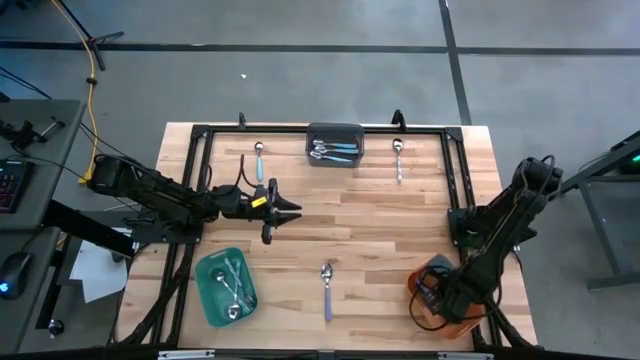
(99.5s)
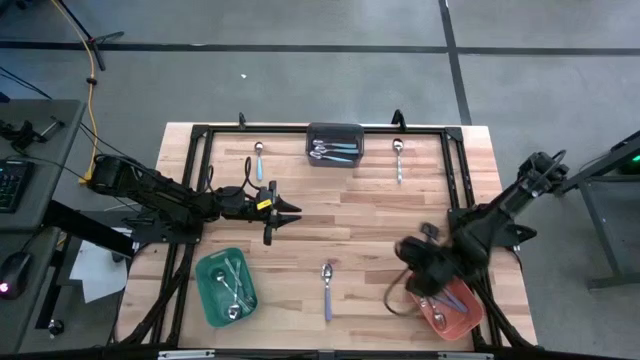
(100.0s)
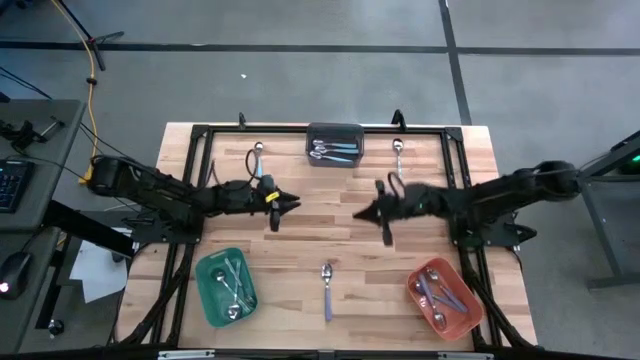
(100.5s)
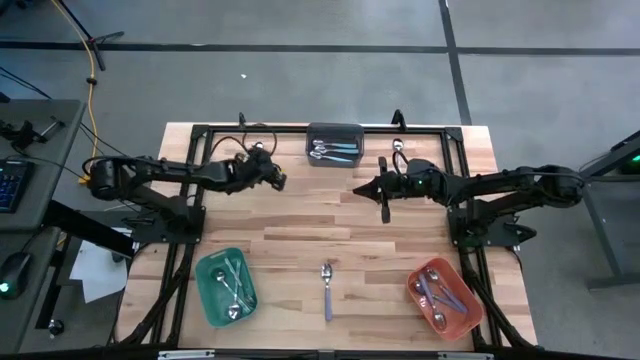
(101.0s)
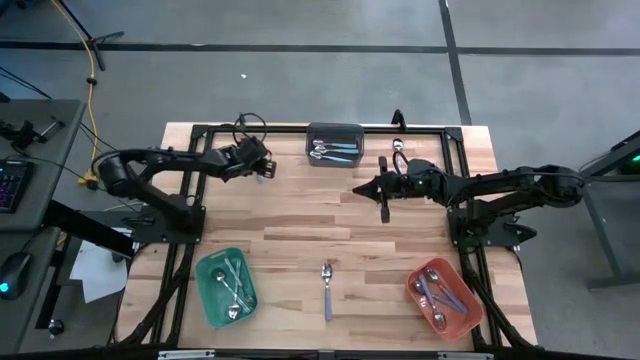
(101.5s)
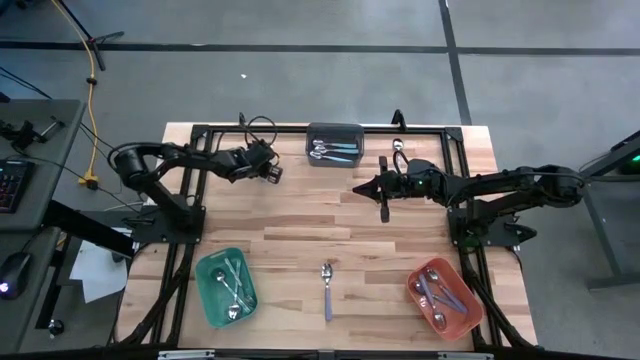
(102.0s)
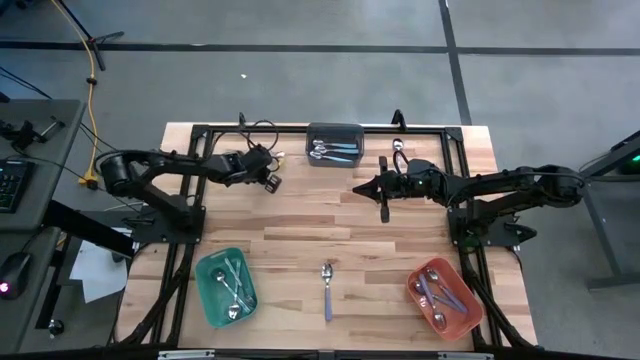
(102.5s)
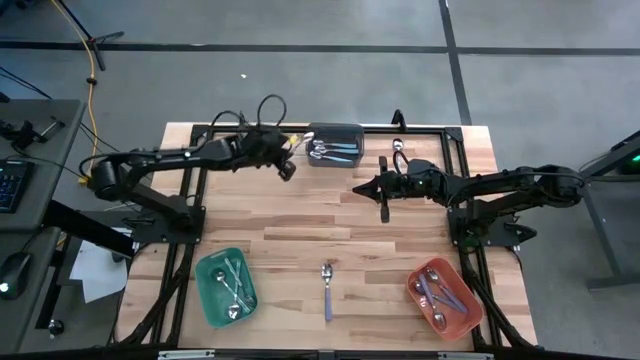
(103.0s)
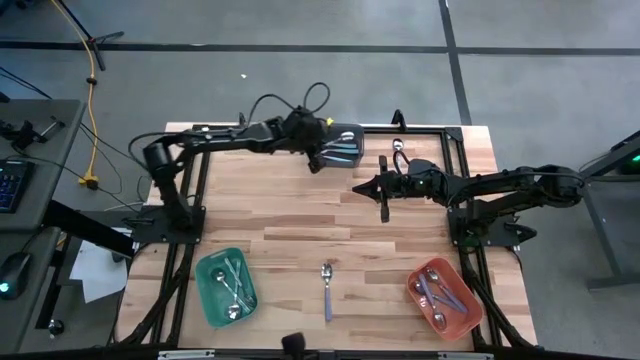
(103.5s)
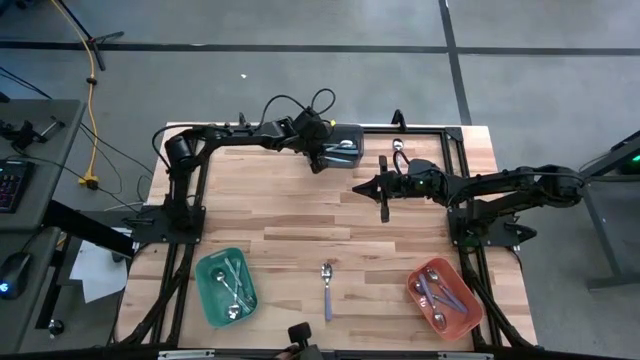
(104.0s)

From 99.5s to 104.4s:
Task: Sort silverware by color (type)
Put the blue spoon into the black bin

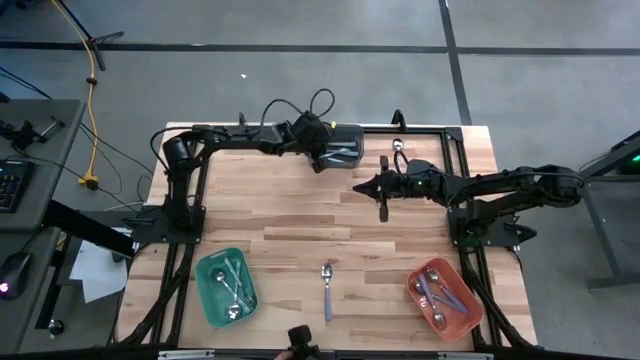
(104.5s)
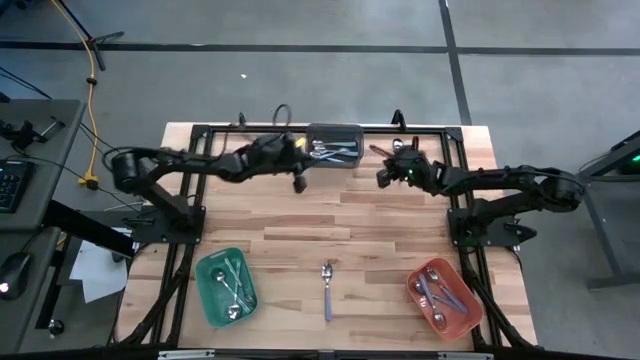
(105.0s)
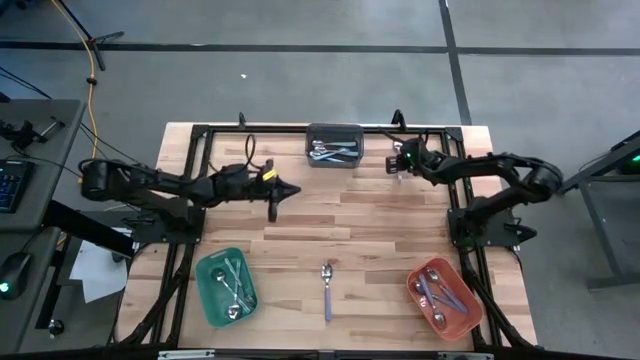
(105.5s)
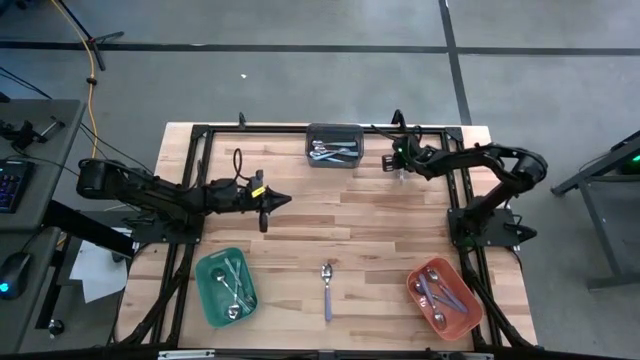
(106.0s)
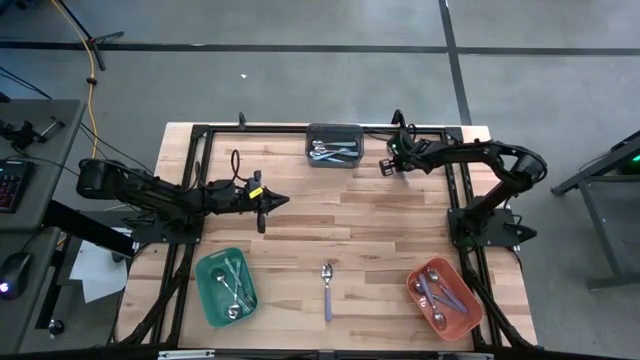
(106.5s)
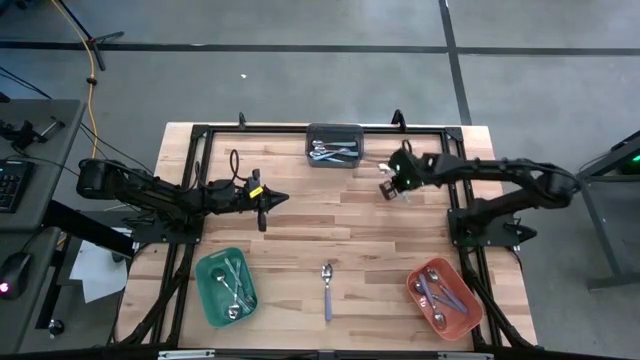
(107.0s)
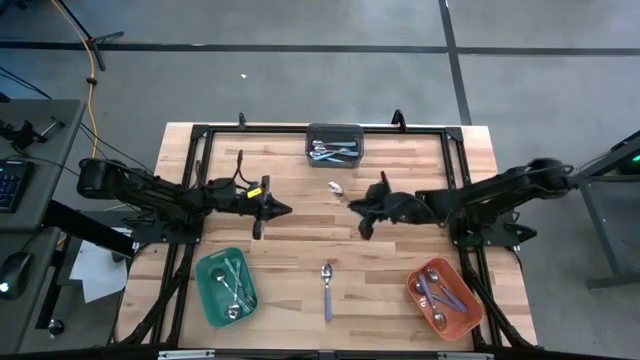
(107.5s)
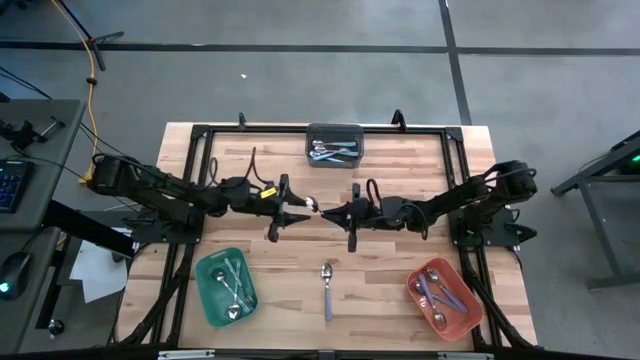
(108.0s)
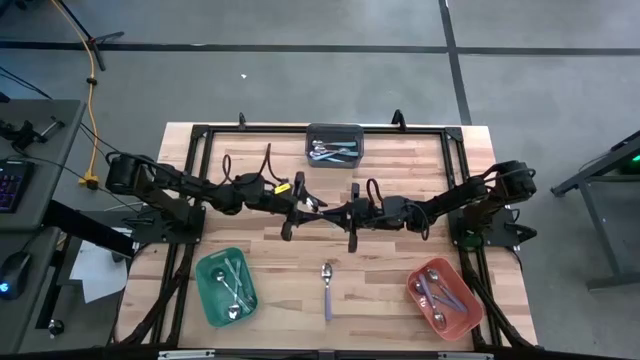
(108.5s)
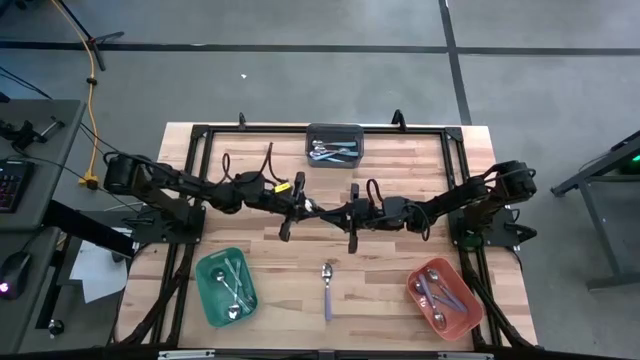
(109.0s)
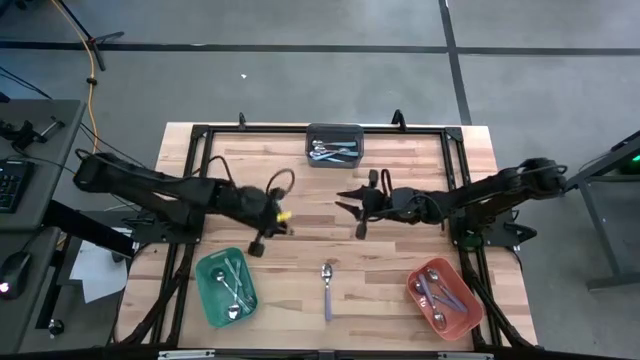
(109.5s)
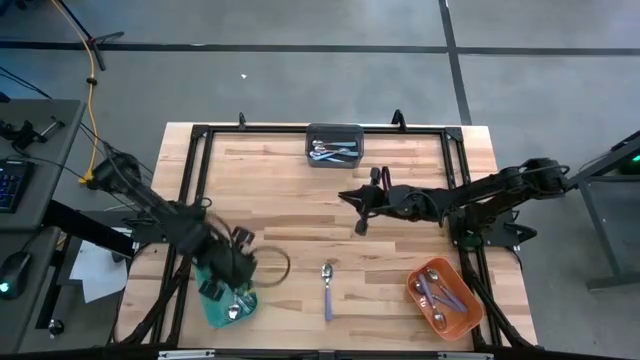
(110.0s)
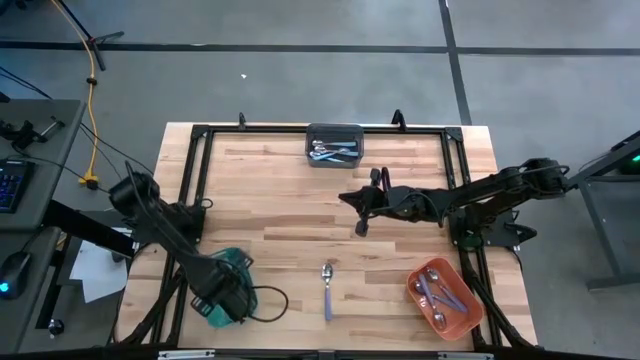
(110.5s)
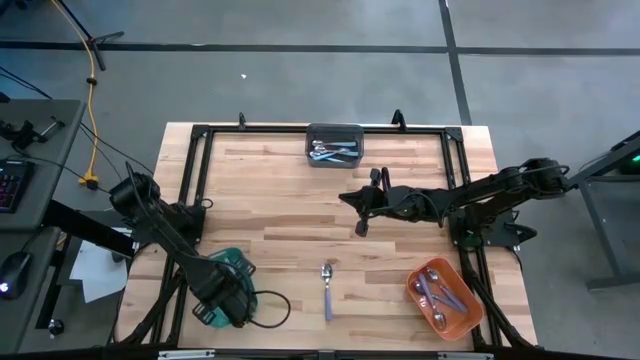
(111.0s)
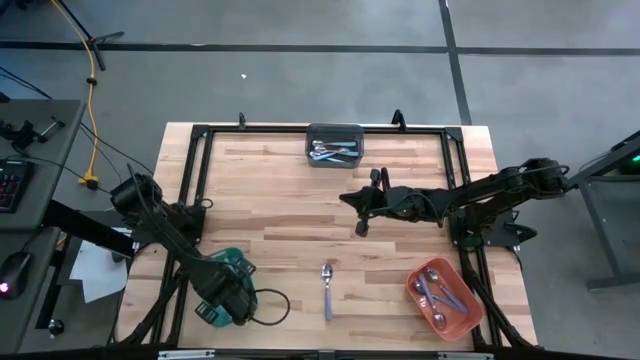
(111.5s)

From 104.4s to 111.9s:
Put the white patterned into the green bin

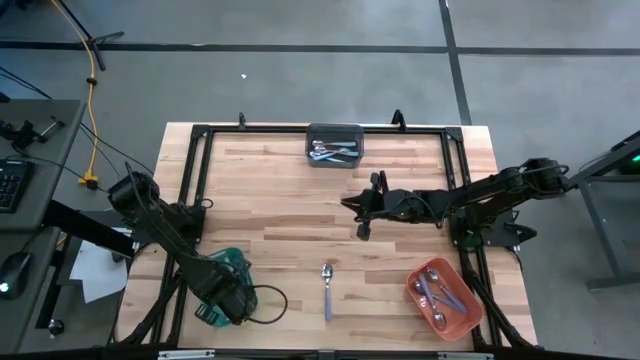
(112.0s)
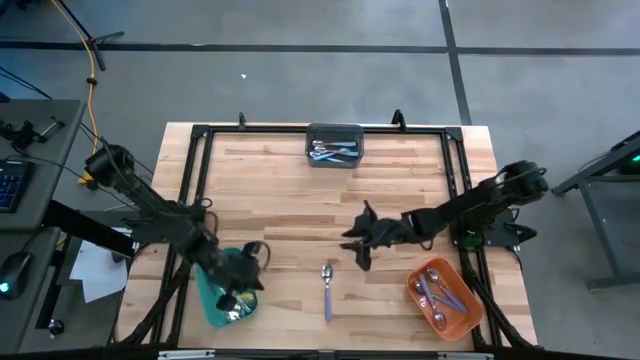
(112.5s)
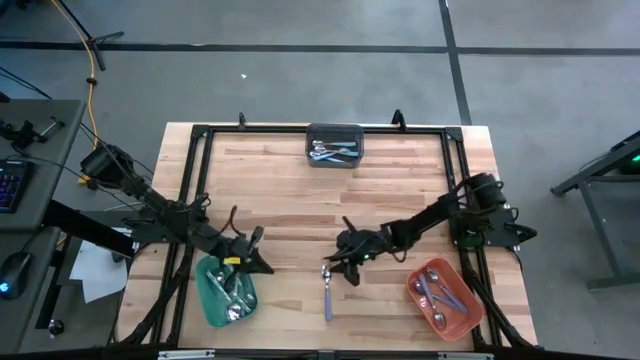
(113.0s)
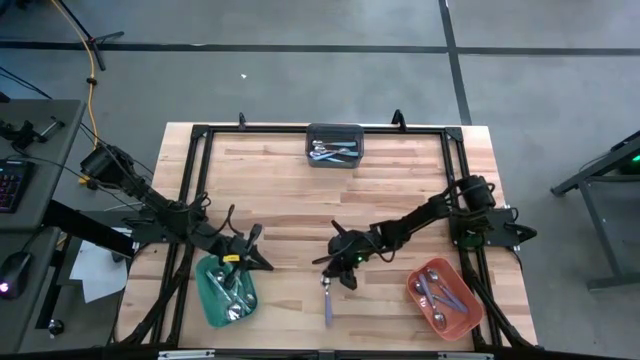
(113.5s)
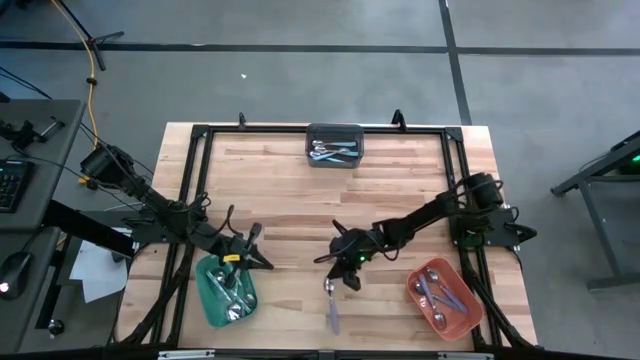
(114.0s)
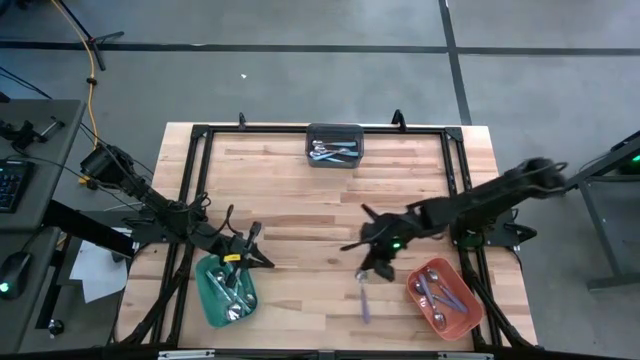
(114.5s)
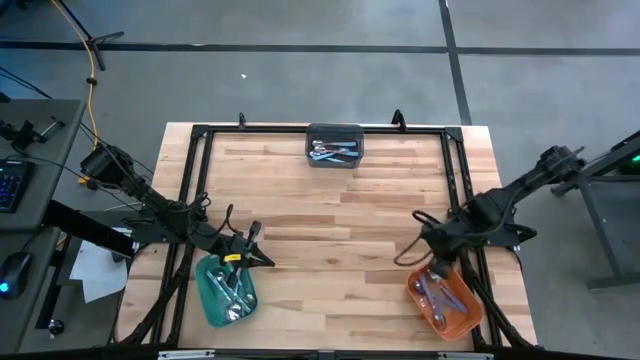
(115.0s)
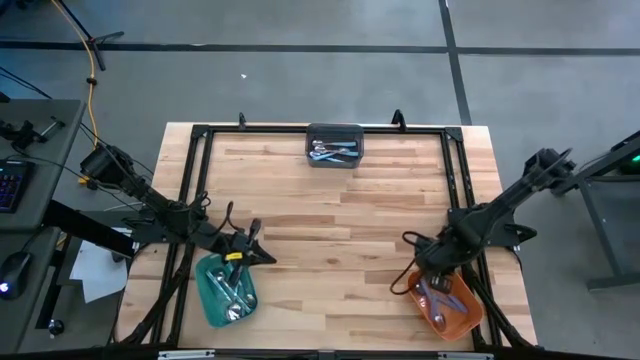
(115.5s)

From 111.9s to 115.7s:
Put the purple spoon into the orange bin

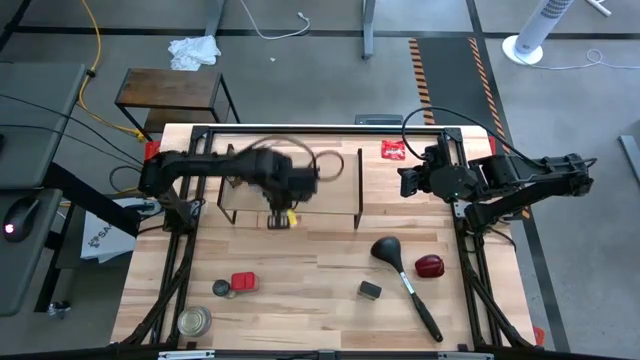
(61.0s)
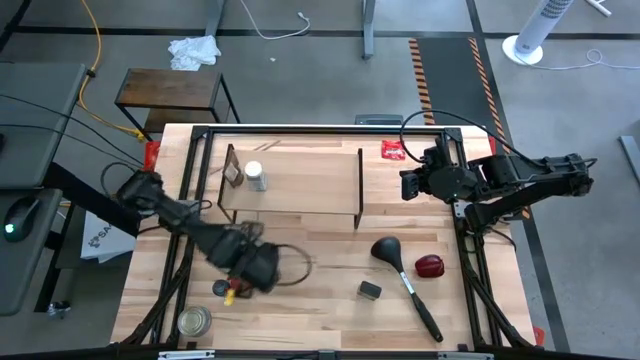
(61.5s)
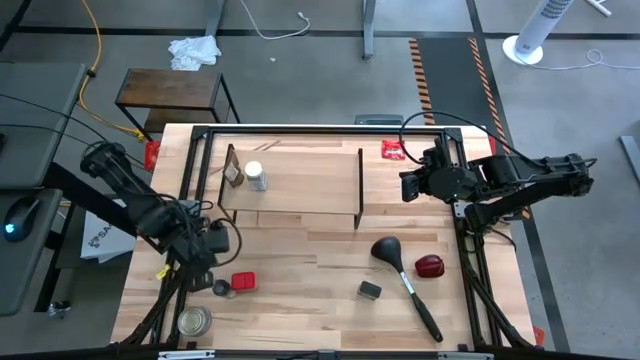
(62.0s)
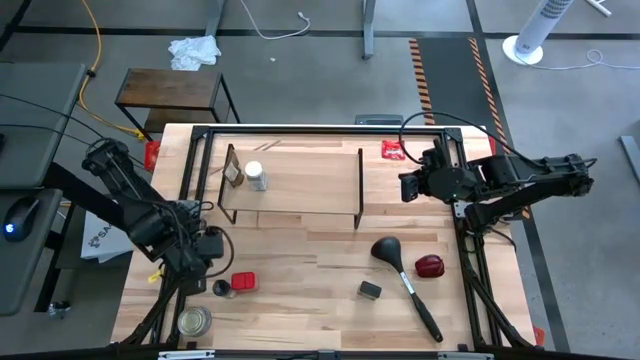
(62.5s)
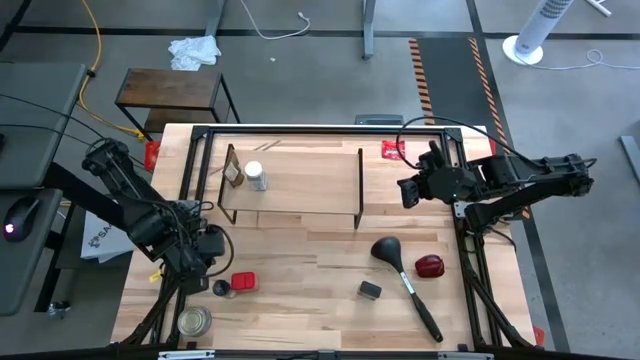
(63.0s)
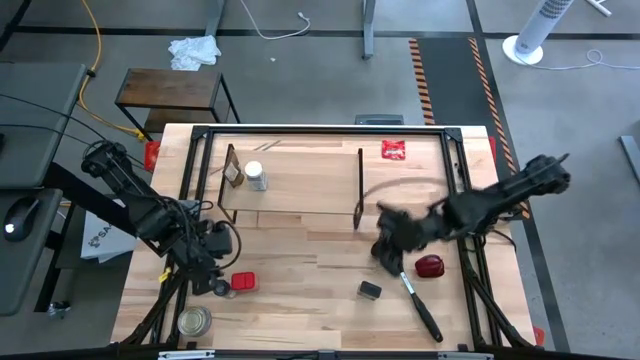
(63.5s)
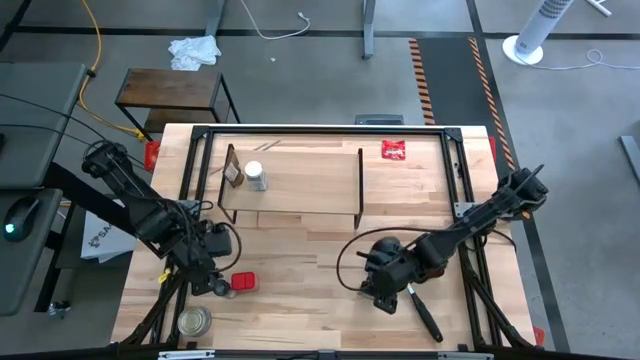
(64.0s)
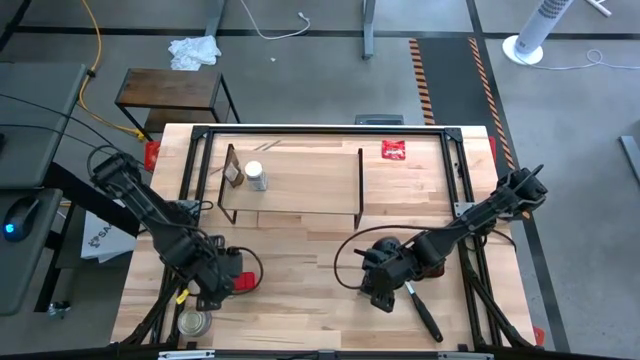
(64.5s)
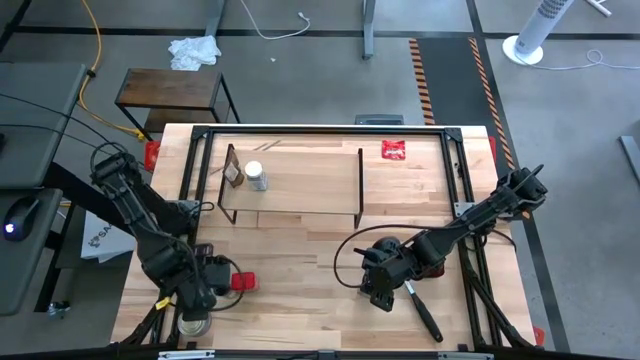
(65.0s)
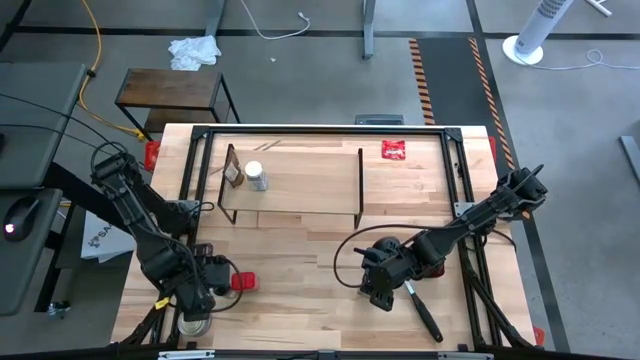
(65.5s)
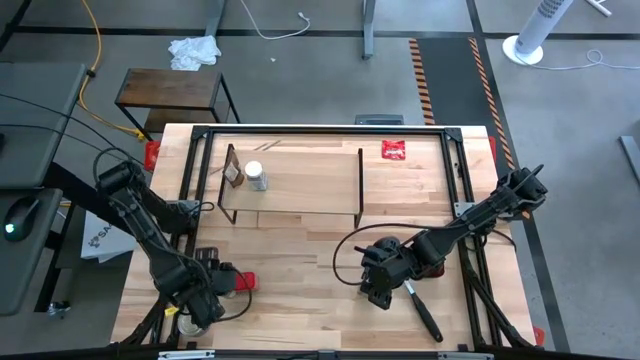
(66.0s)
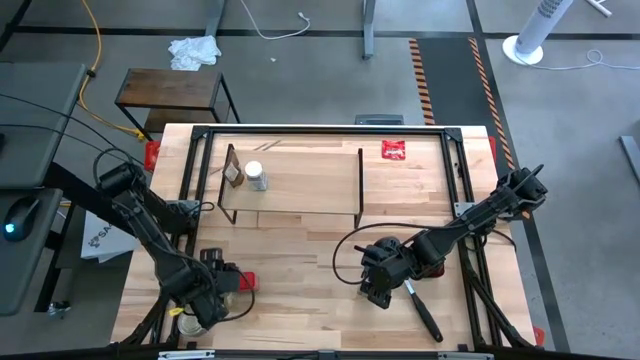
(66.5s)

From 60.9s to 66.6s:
Task: Shelf spices
Put the black seasoning bottle on the shelf
